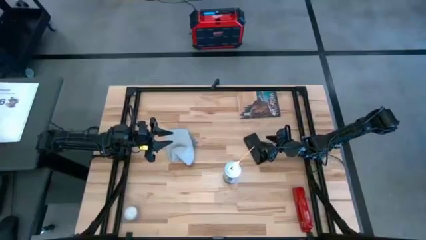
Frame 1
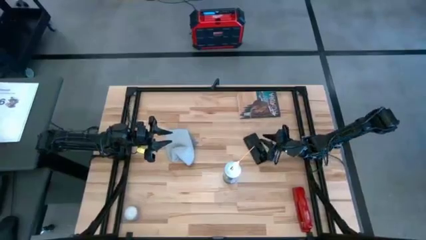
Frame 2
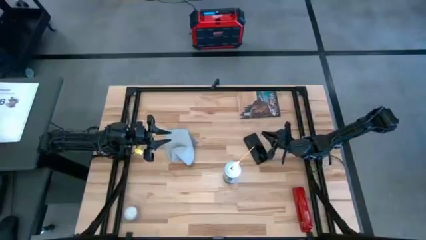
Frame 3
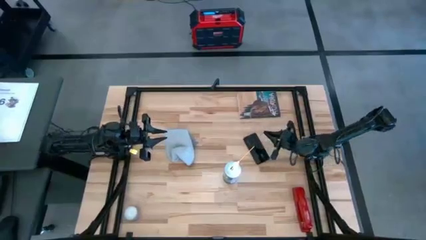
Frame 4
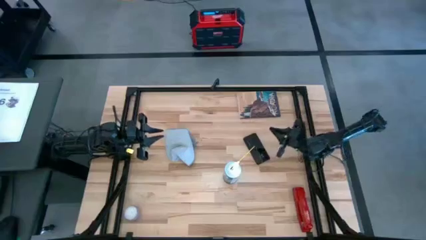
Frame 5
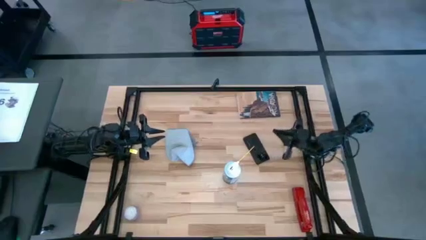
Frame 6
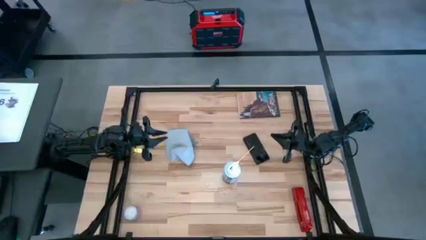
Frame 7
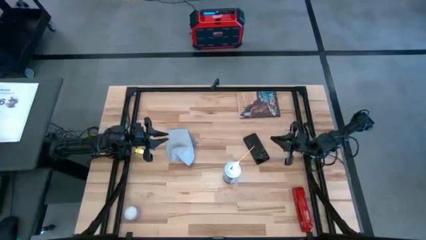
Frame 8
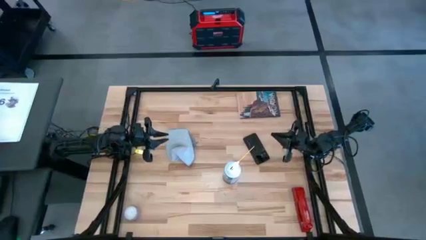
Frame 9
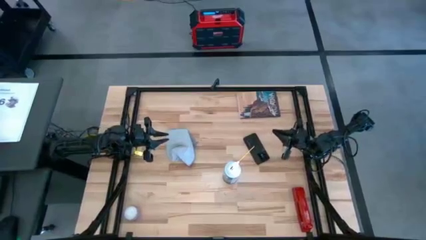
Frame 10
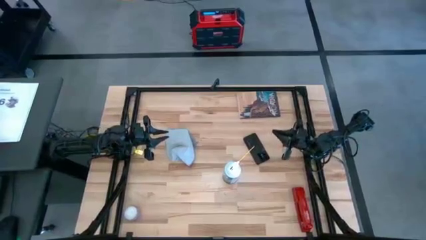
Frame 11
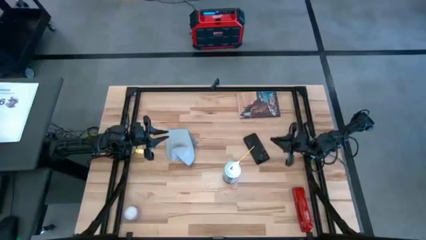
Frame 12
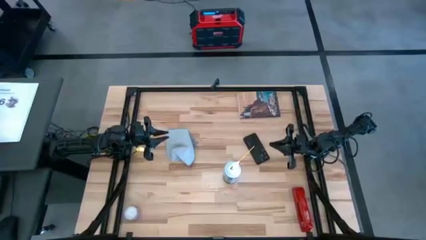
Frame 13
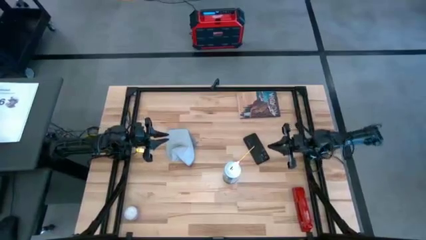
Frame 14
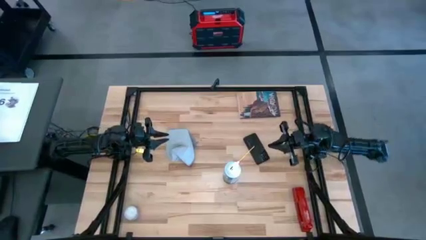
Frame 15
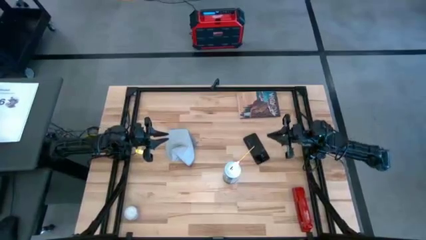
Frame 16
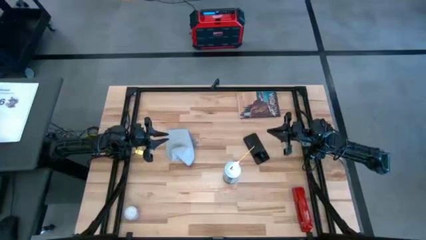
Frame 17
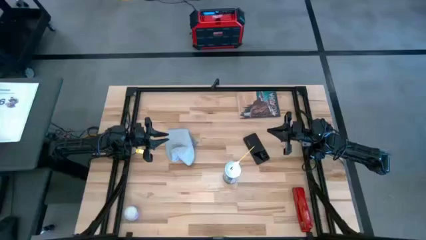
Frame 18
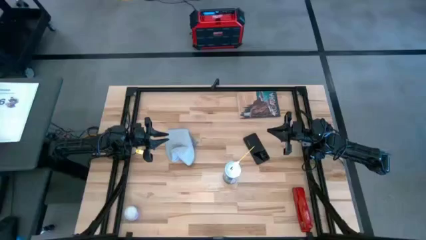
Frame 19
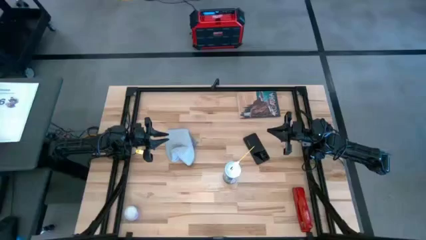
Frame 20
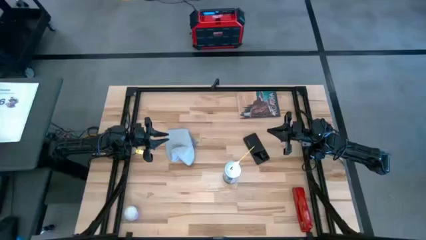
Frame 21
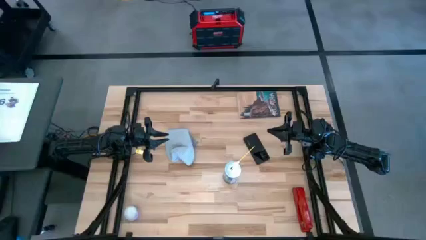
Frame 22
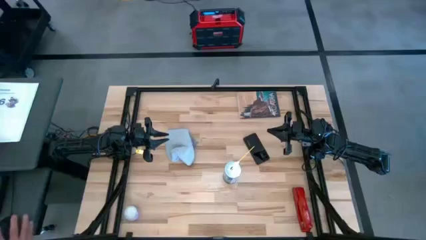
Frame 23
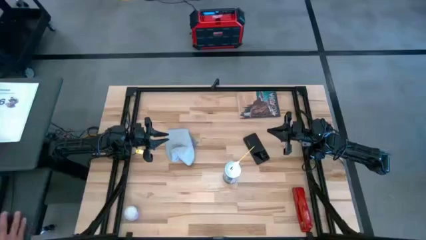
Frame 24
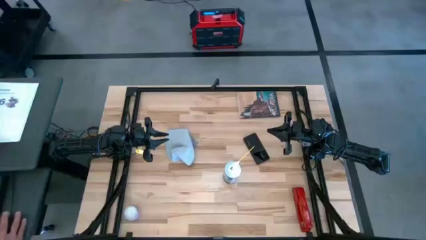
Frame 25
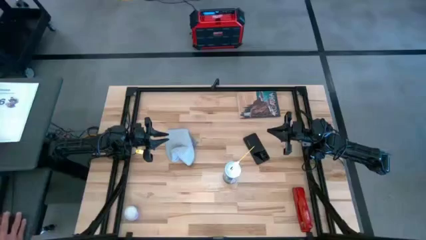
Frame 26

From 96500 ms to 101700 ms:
Task: Apply microfiber cloth
Return to Home Position

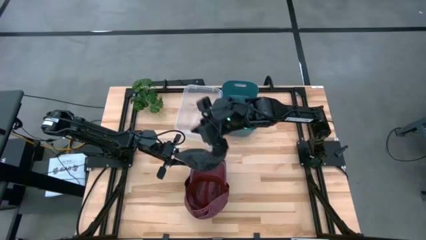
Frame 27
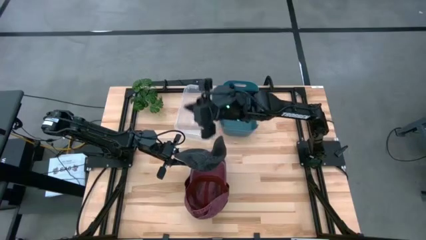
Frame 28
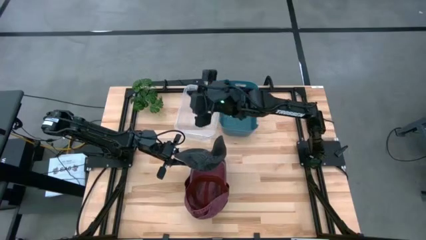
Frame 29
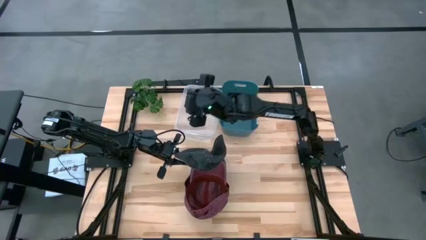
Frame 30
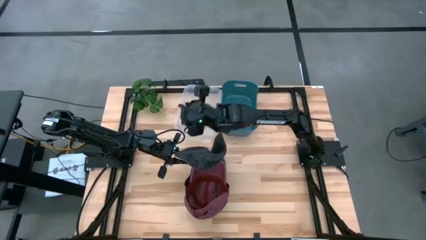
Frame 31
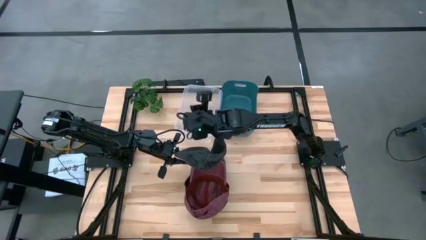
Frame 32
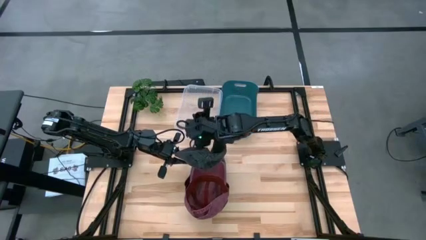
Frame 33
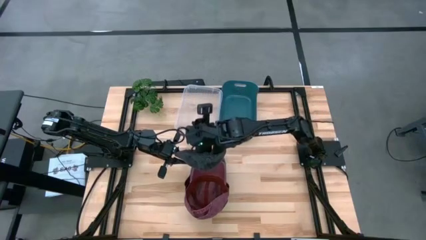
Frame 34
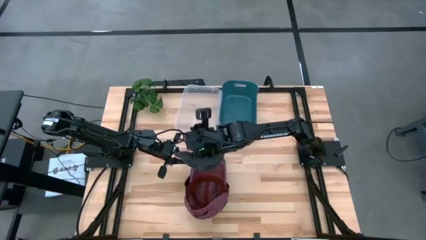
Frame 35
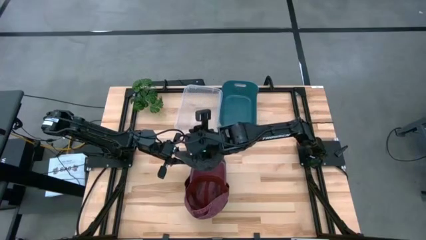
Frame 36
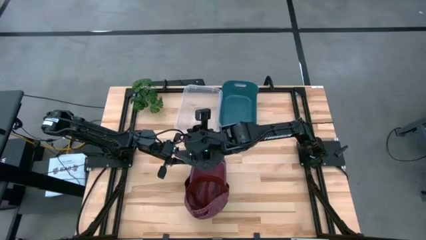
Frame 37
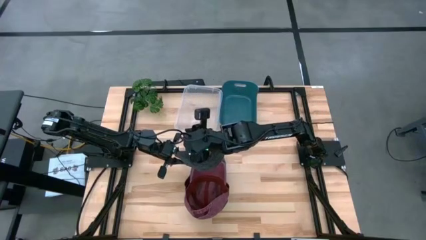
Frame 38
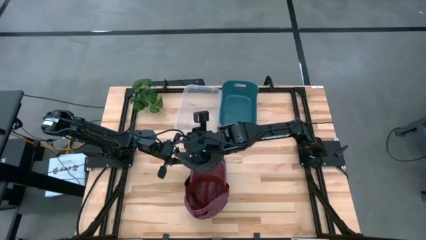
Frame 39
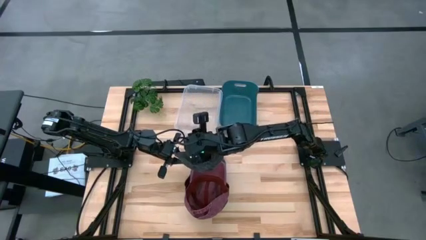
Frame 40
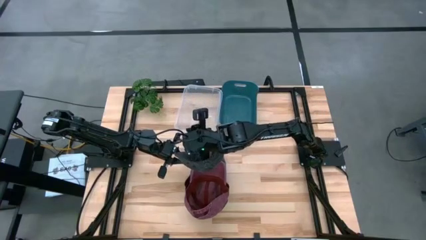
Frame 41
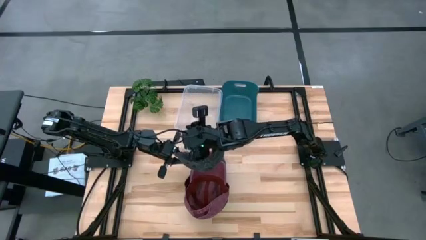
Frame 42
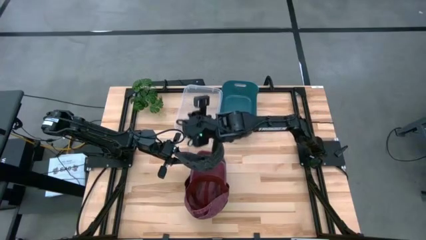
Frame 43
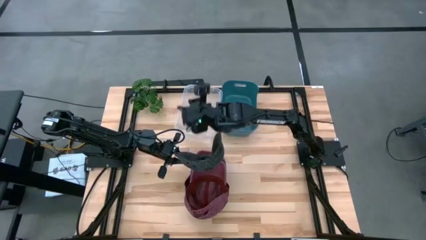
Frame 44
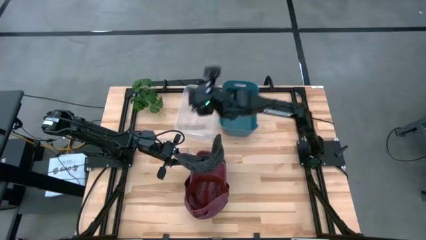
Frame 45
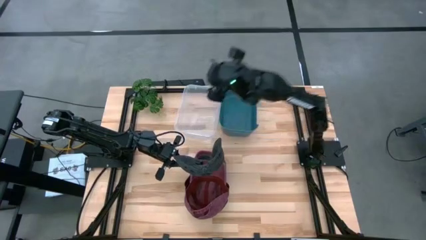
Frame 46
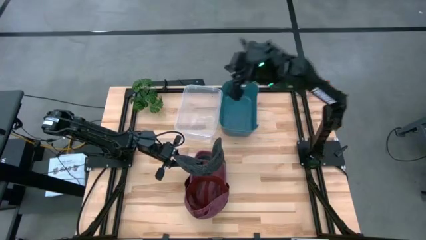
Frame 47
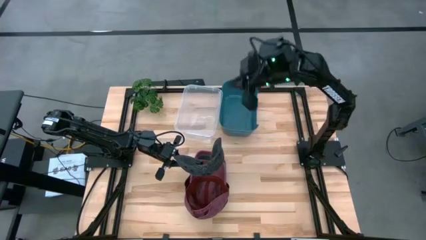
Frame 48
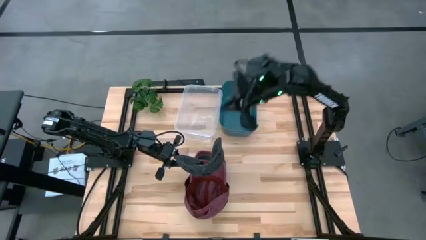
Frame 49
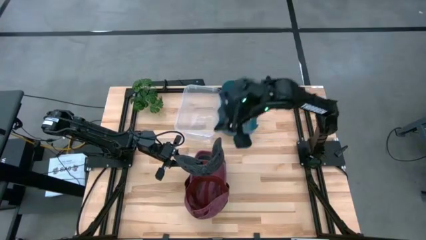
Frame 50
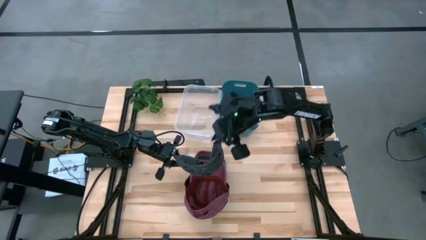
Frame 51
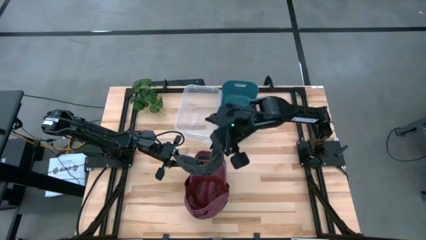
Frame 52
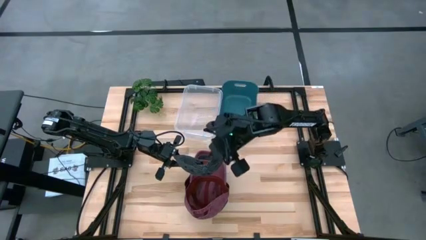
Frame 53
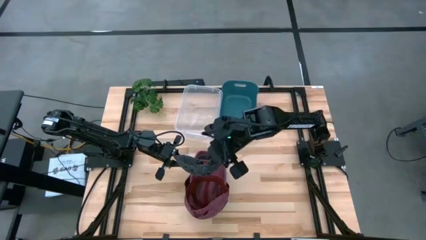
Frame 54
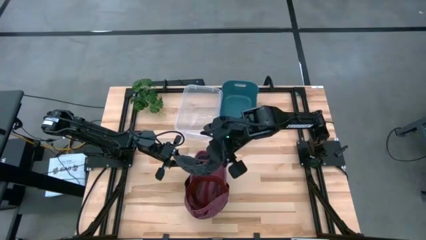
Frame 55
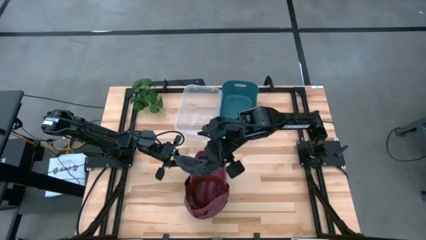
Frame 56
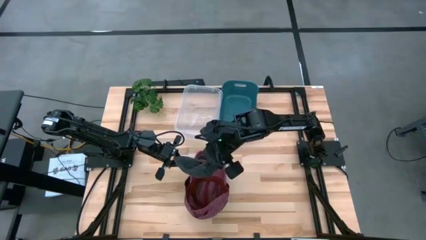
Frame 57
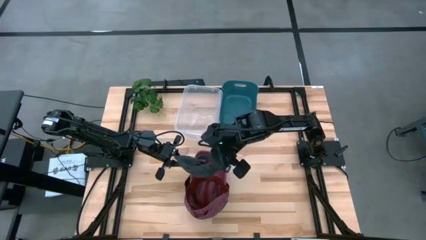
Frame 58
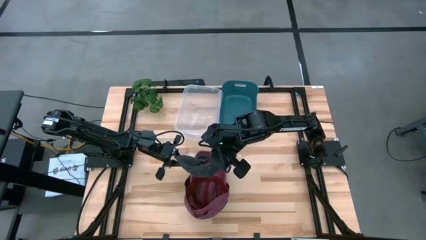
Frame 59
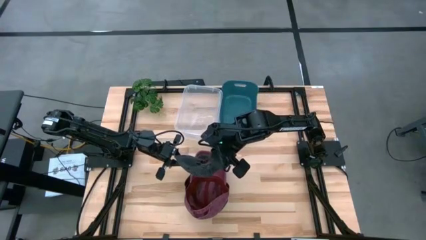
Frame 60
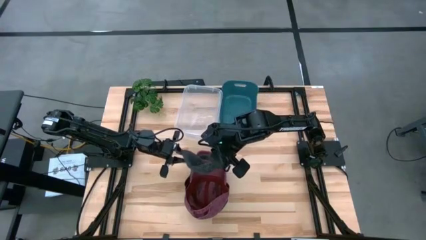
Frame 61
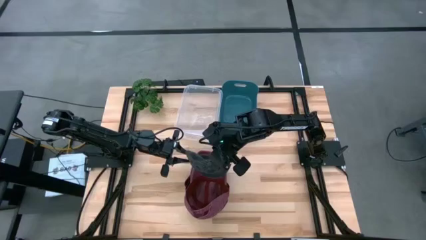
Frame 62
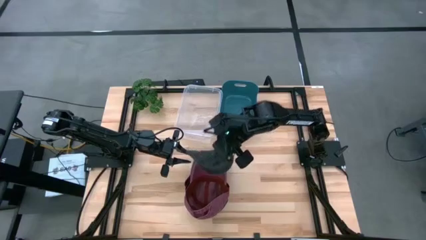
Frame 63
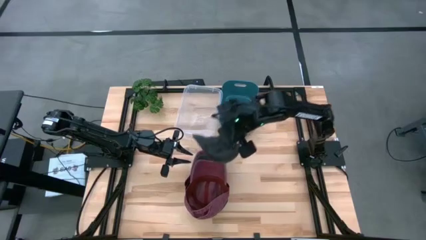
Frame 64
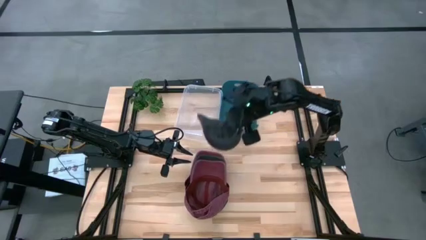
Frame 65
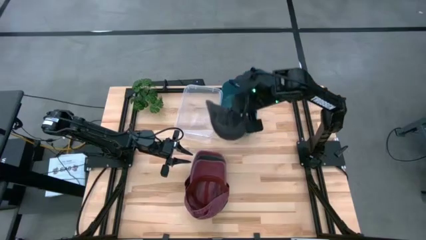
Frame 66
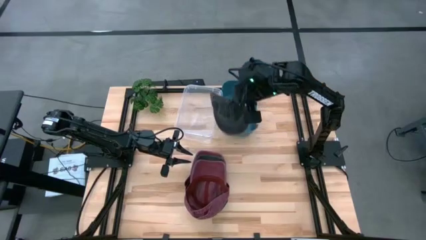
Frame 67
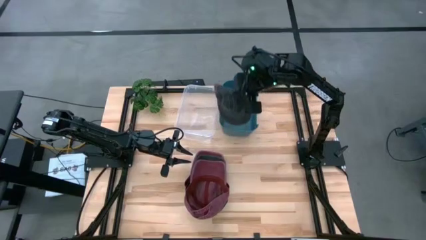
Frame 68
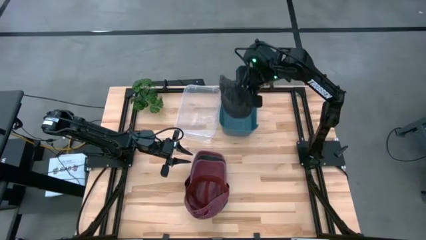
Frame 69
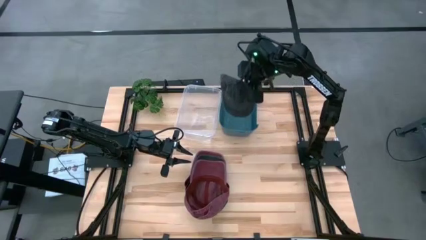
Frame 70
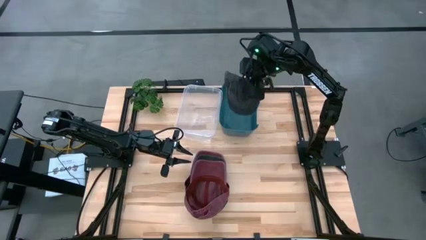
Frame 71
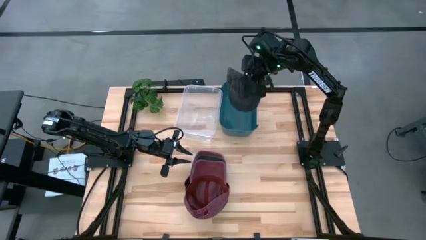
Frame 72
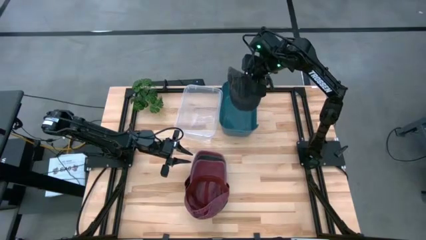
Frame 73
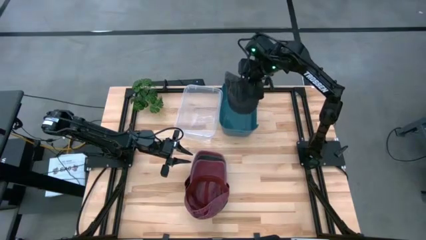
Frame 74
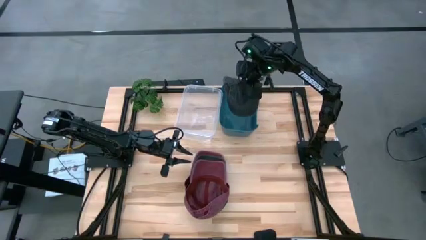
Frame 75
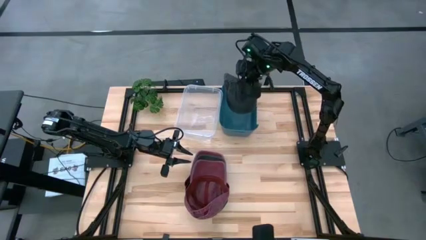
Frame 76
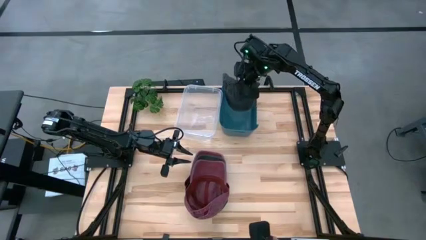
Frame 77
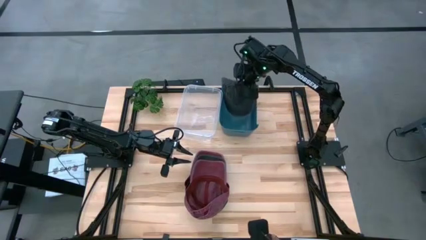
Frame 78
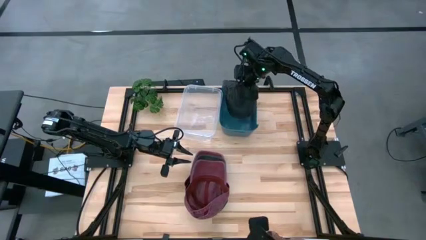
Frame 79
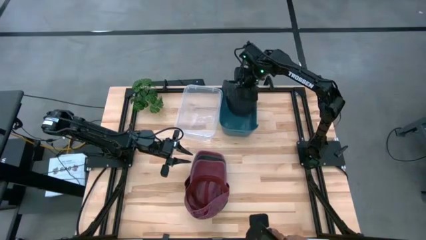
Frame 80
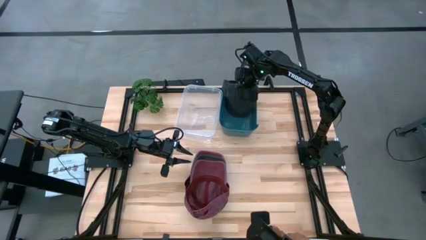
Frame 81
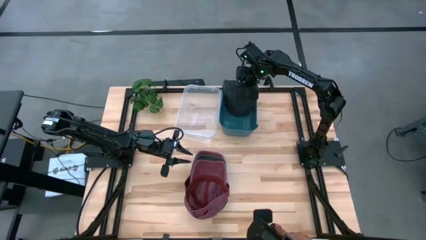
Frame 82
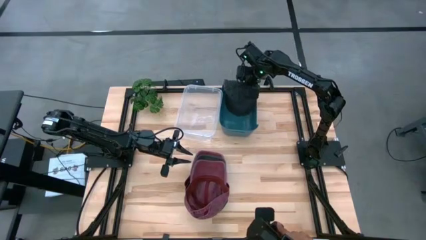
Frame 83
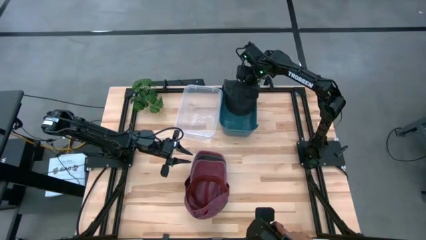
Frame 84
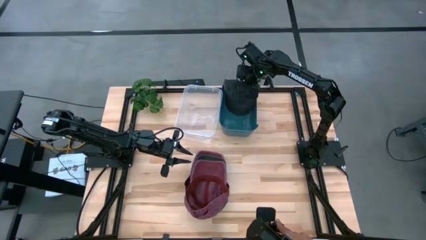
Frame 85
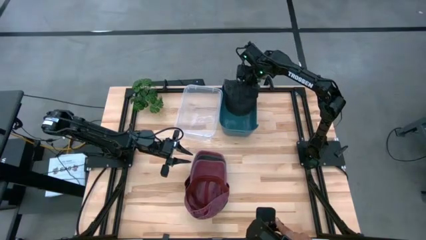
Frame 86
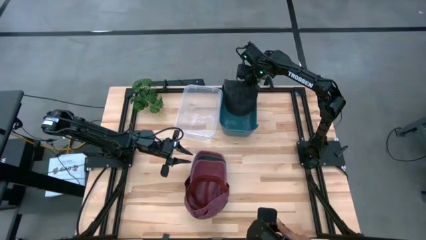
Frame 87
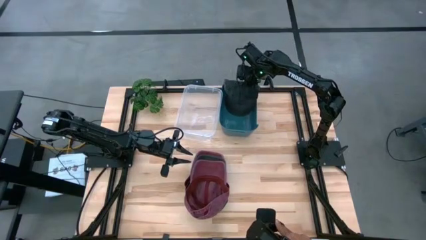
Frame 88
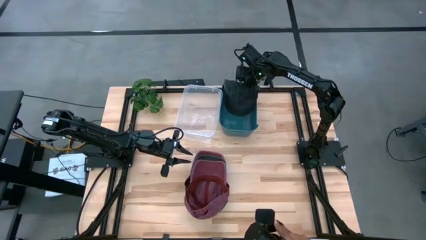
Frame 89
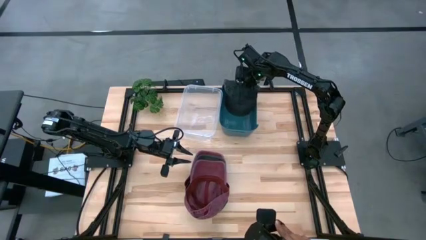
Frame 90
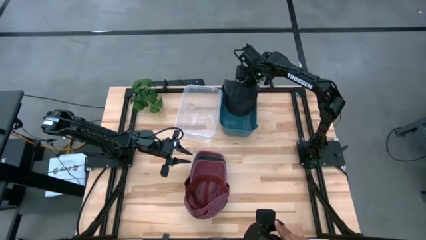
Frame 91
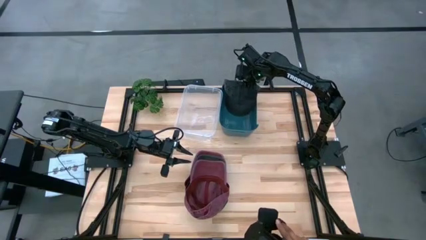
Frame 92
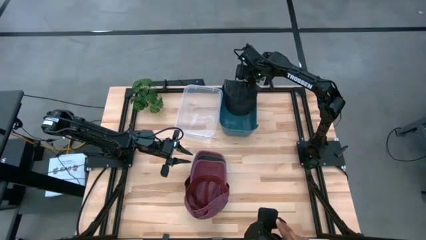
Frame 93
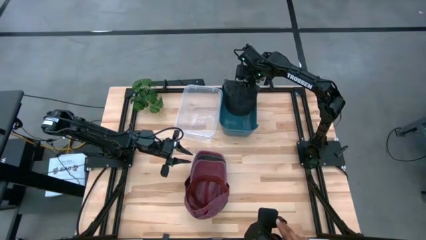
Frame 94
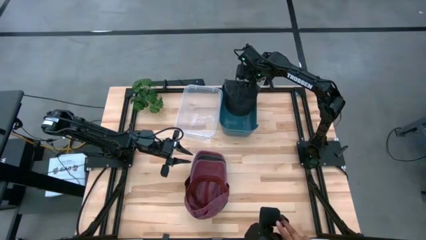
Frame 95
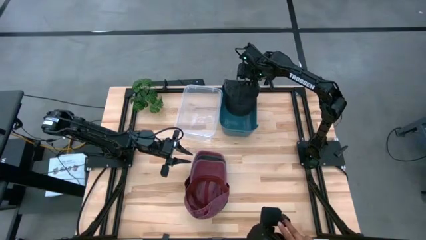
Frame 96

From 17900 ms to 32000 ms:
Task: Pick & Place hat
Put the top black cap into the blue bin
